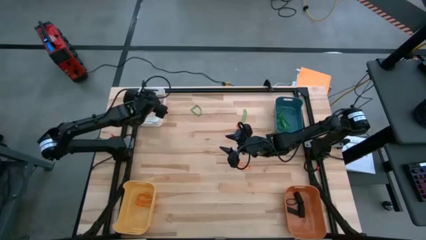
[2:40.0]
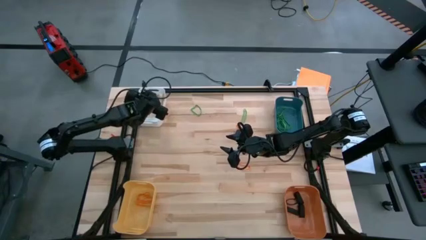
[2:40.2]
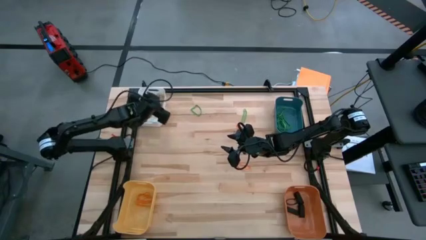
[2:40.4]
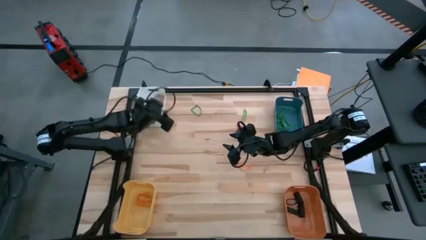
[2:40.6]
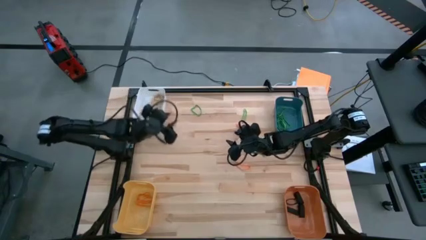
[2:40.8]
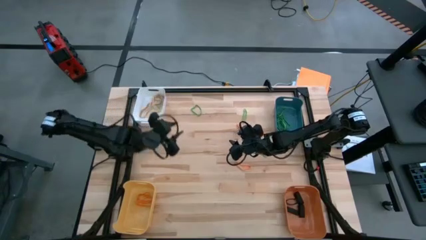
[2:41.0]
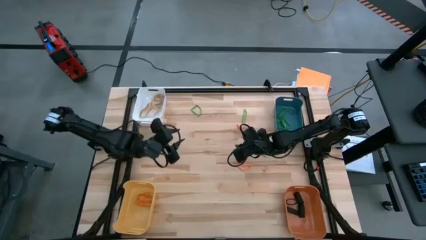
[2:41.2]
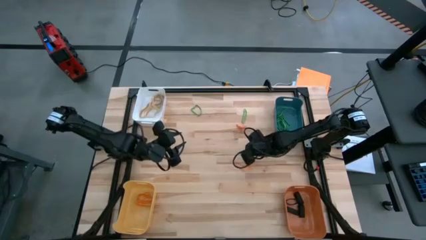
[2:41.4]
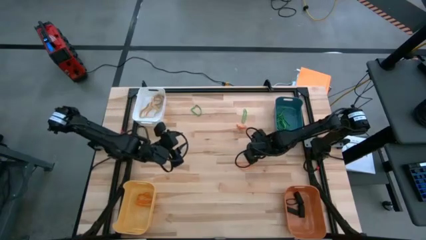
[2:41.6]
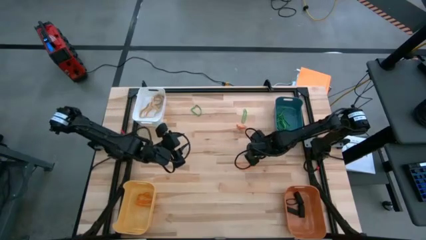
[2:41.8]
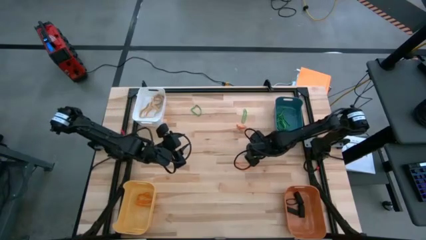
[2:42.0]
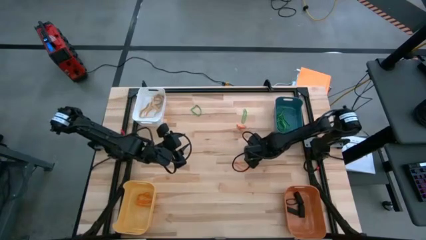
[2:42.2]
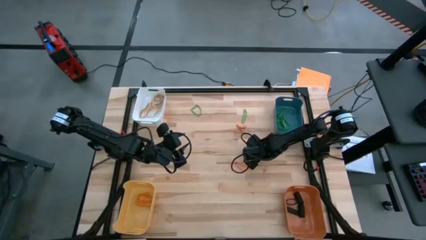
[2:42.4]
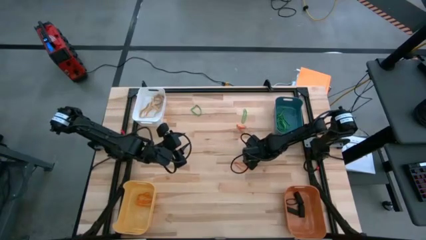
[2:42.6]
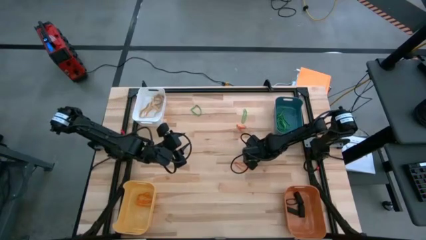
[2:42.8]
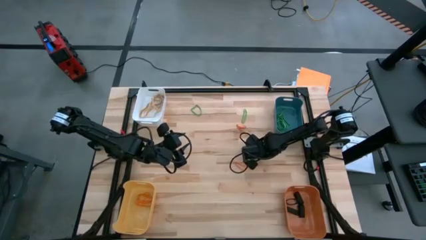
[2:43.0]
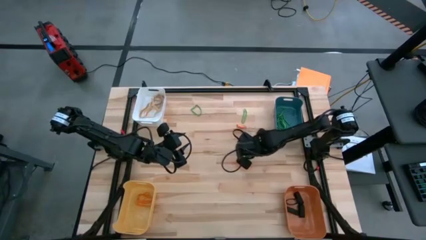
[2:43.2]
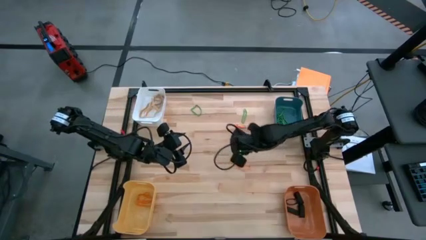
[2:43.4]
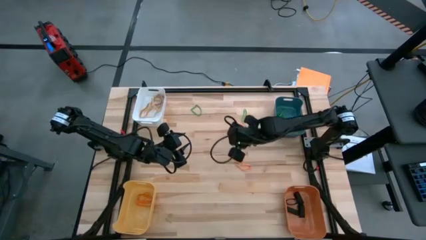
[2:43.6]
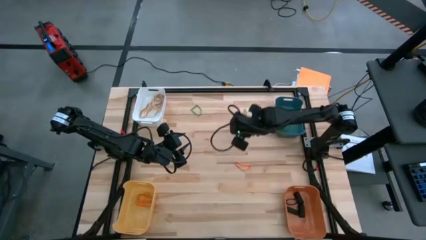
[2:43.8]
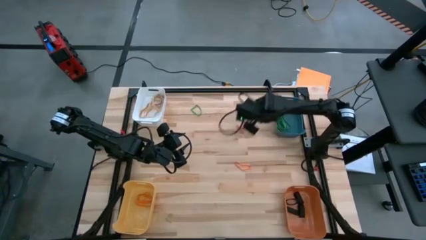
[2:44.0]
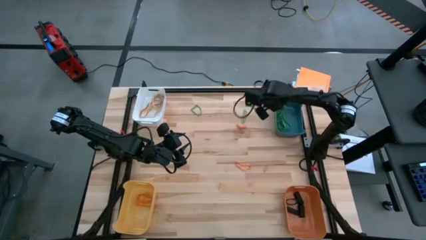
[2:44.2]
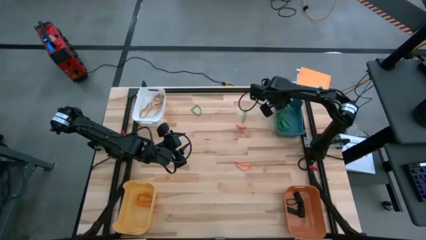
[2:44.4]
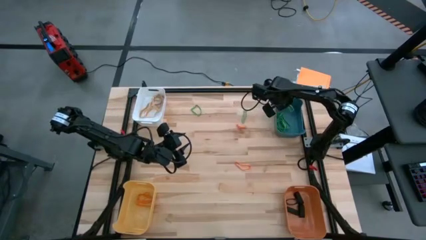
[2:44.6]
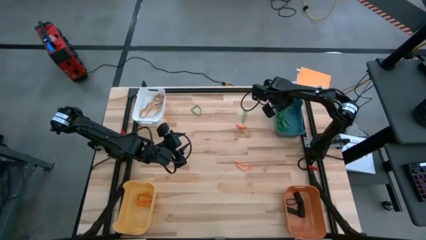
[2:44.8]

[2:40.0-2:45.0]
Task: Sort rubber bands into baskets
Put the green rubber band into the blue bin

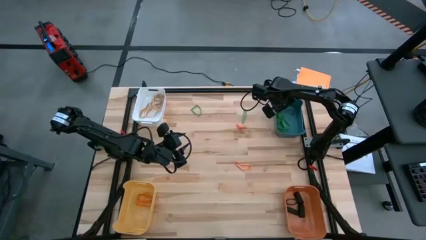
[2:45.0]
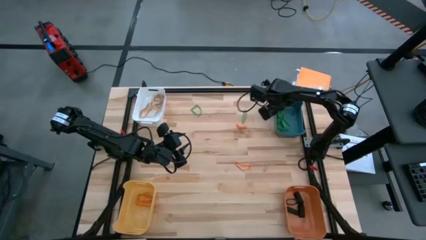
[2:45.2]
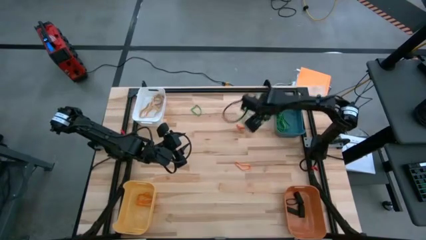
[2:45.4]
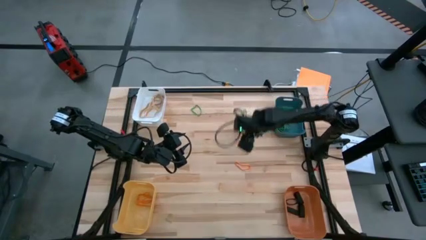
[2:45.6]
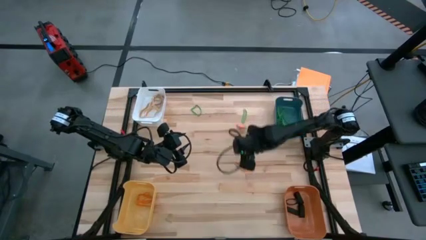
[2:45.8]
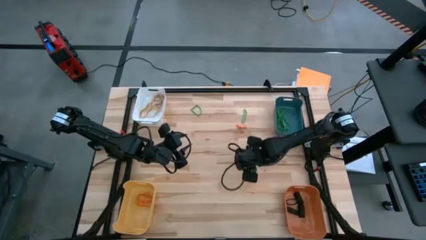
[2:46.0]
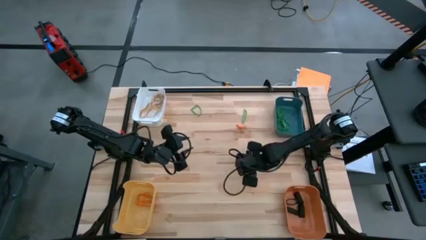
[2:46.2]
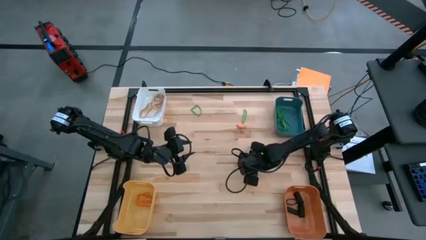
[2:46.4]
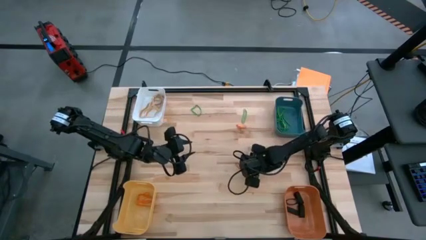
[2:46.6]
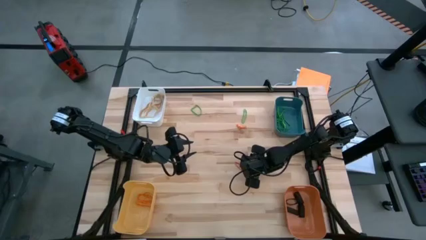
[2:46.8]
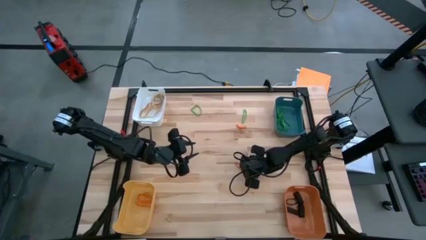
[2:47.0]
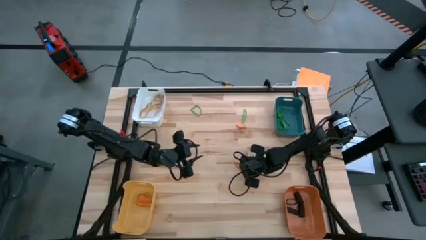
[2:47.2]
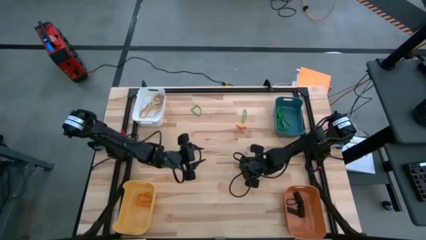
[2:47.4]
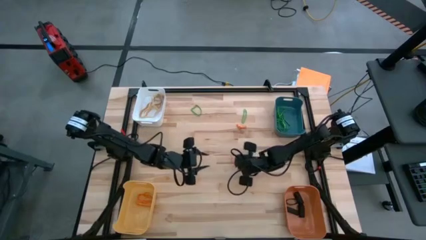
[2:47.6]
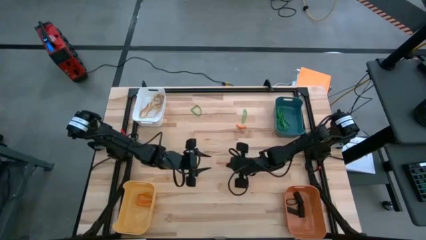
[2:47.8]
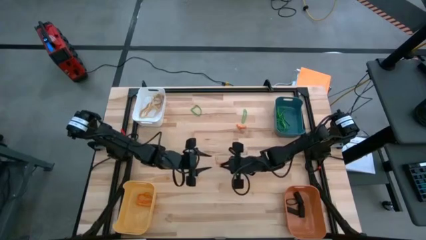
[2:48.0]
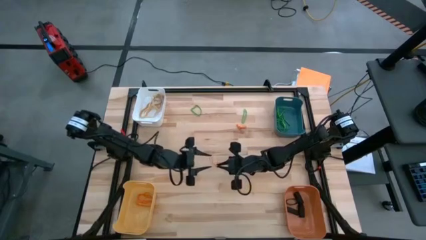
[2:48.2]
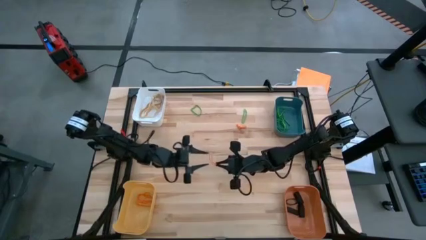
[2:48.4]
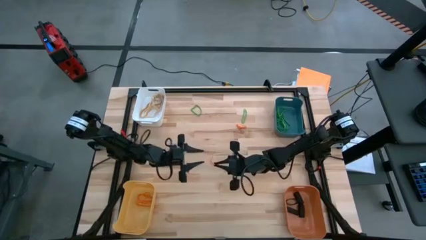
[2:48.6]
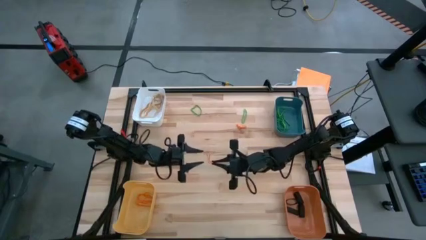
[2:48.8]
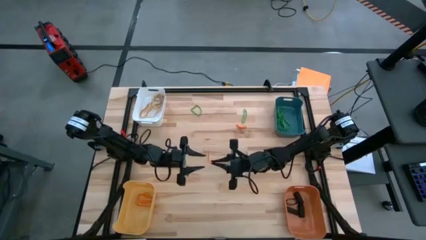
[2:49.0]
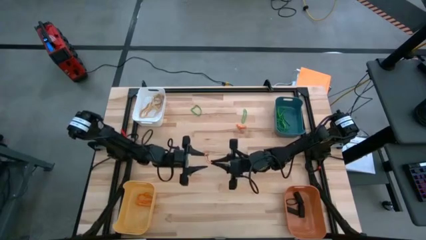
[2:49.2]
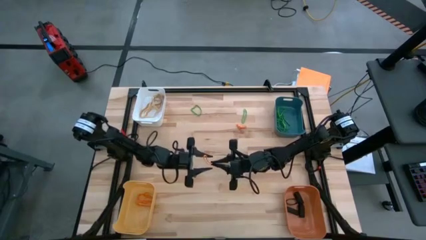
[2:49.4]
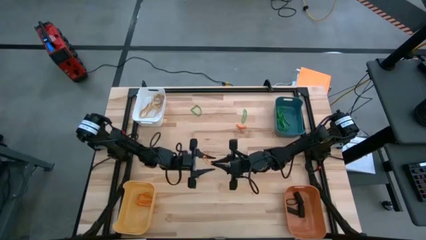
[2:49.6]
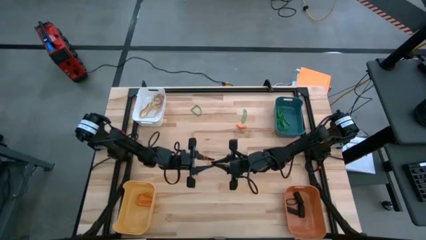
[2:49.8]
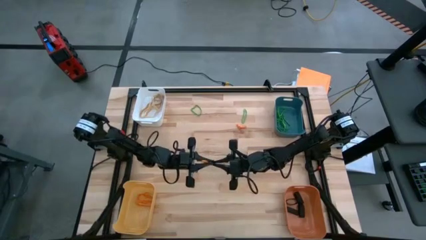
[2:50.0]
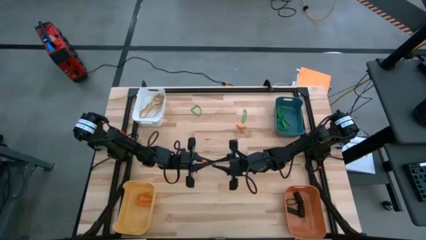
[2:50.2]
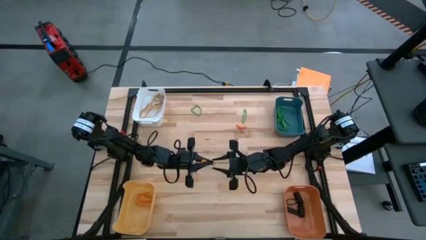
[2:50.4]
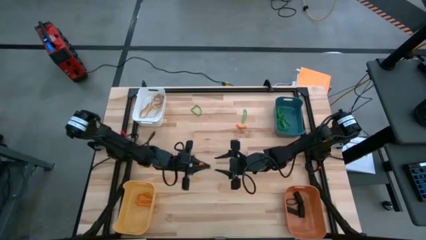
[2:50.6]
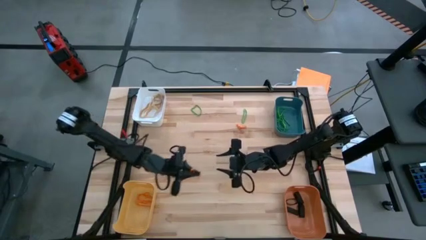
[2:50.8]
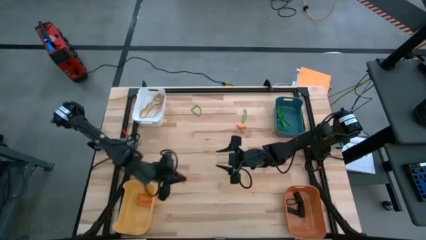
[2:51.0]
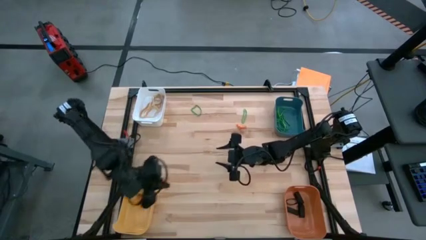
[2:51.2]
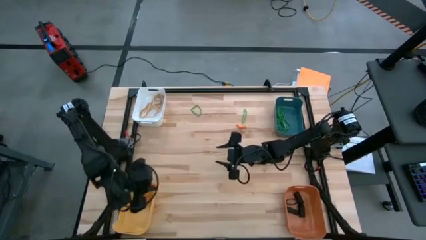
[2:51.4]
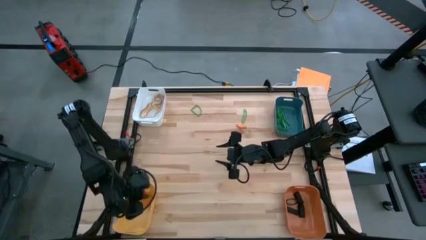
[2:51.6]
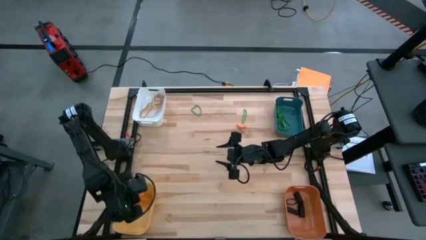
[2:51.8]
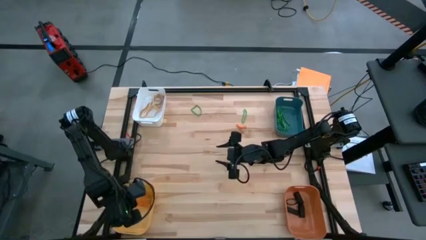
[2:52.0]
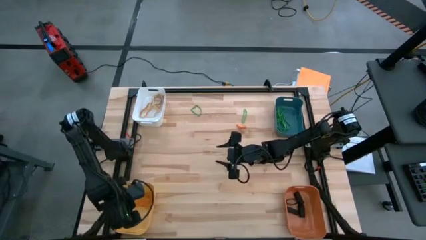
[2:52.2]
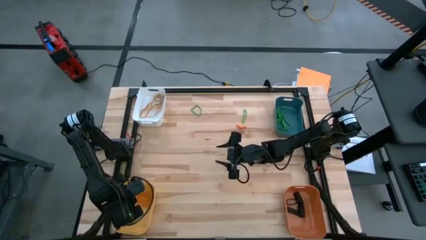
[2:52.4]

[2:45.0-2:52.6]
Put the orange rubber band into the yellow bin

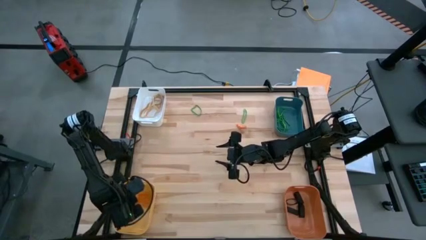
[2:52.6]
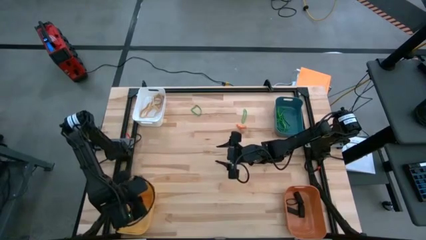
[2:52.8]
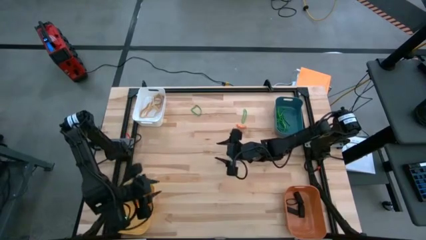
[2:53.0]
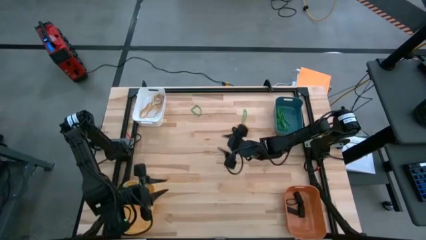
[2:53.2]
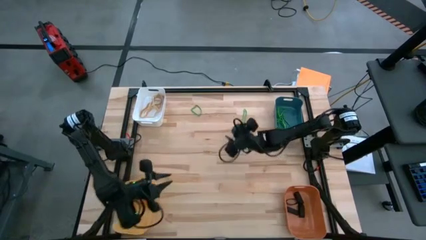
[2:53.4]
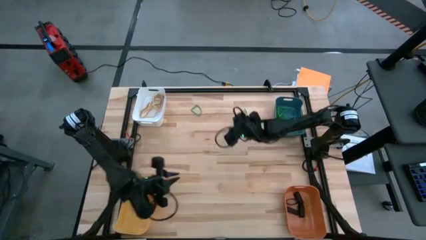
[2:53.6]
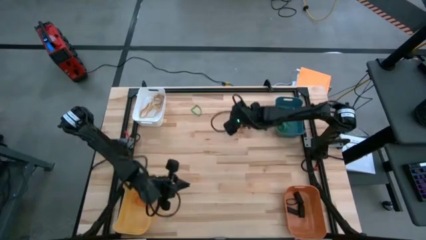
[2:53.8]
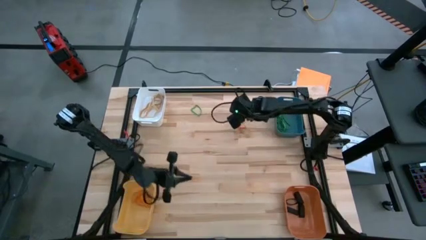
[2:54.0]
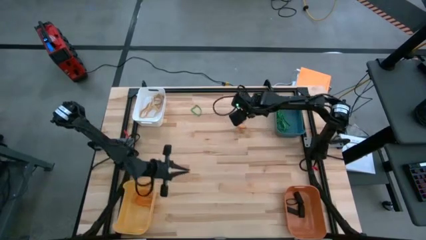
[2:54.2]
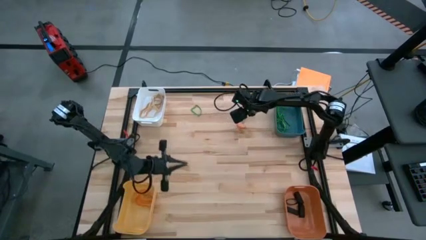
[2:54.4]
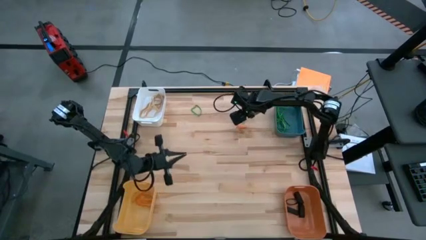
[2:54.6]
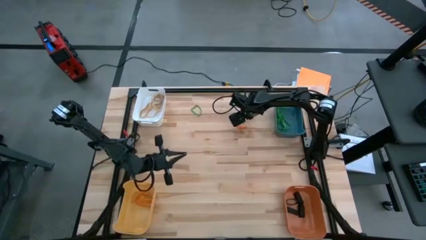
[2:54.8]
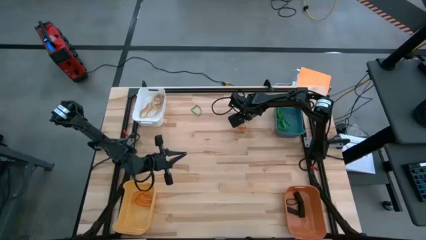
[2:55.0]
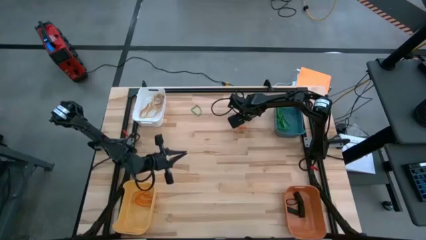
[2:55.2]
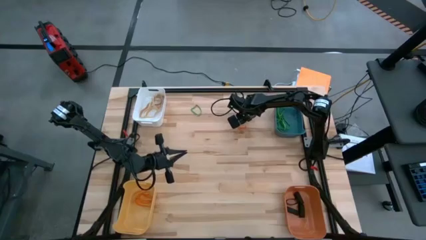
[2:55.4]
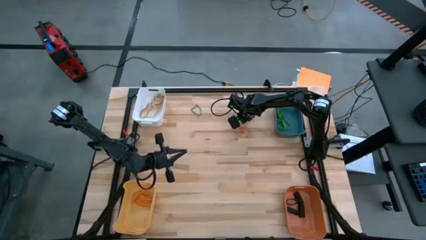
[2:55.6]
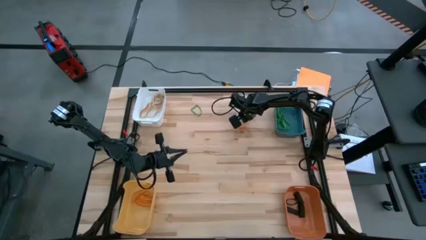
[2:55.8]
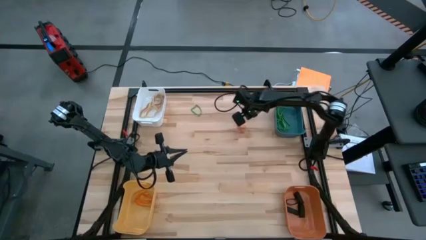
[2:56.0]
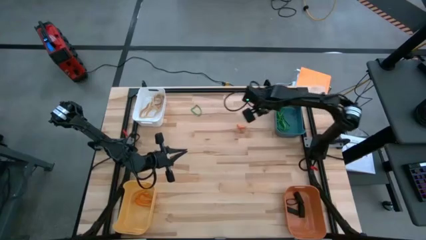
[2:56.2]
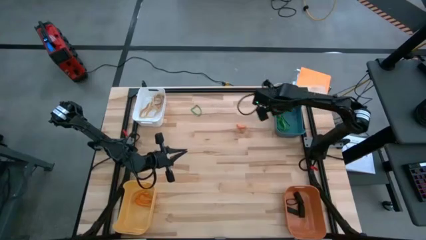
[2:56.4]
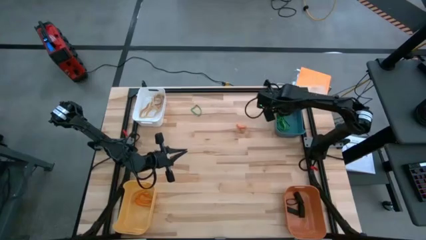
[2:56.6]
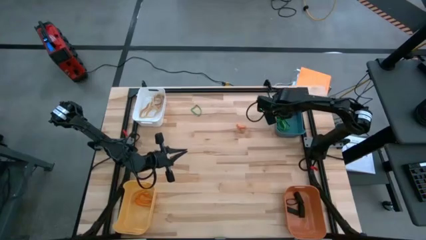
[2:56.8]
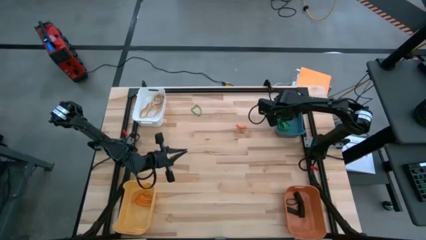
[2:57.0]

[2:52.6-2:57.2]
Put the green rubber band into the blue bin
